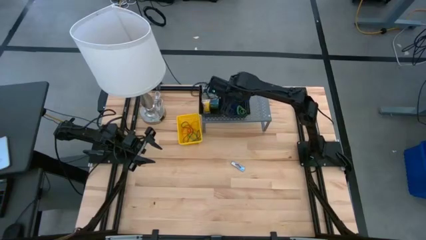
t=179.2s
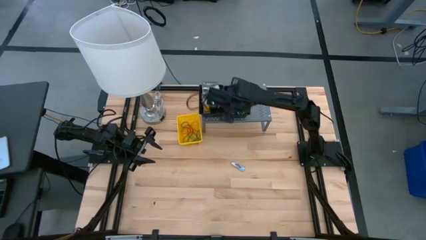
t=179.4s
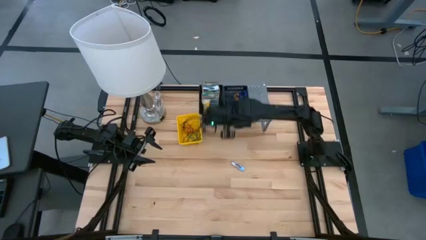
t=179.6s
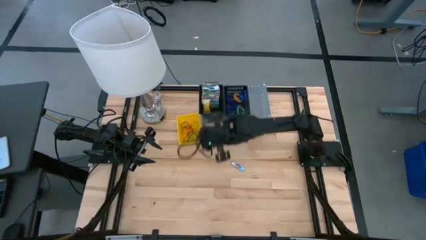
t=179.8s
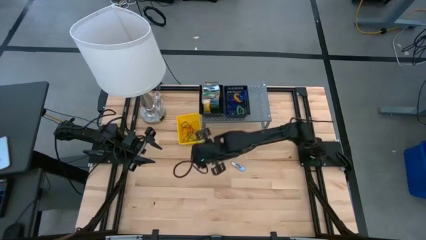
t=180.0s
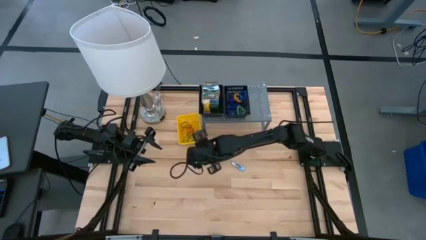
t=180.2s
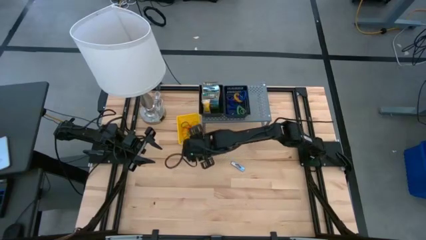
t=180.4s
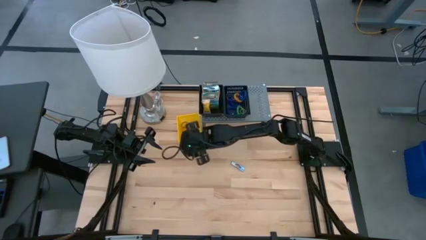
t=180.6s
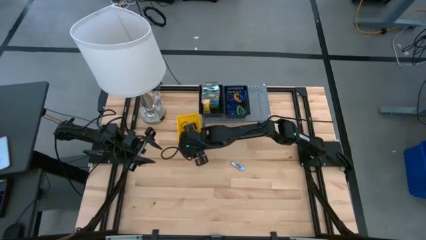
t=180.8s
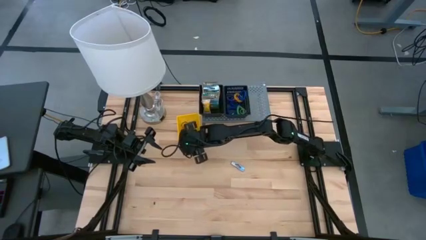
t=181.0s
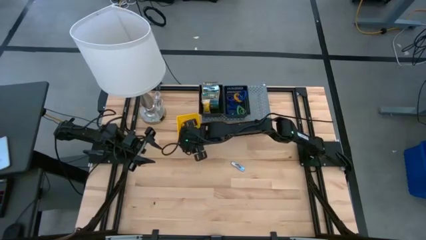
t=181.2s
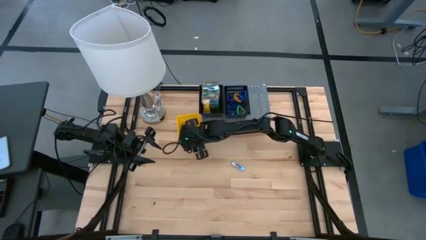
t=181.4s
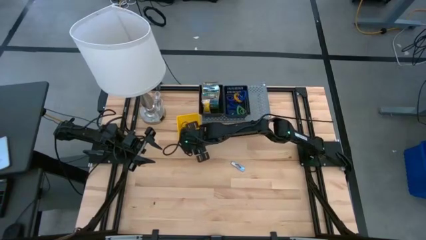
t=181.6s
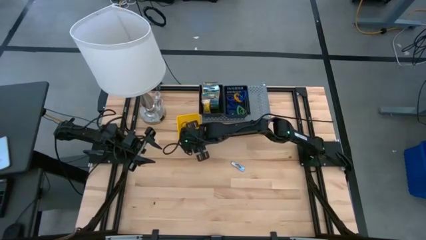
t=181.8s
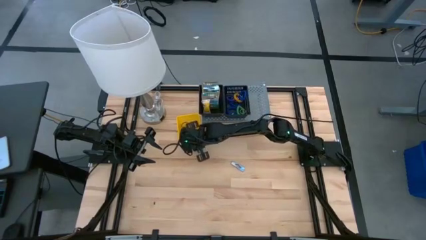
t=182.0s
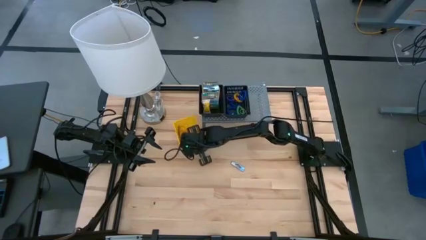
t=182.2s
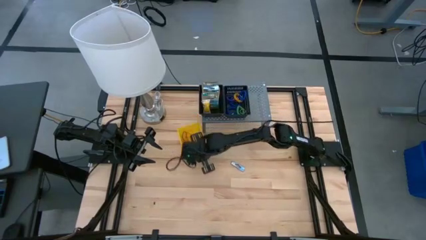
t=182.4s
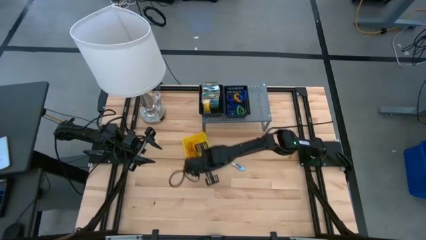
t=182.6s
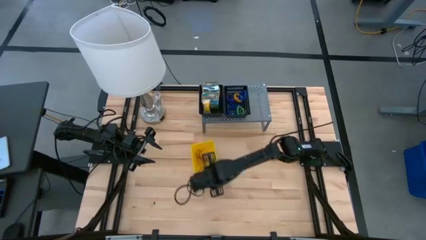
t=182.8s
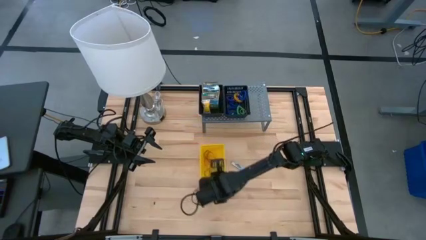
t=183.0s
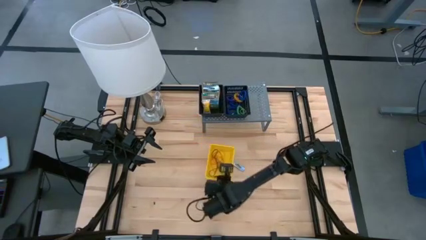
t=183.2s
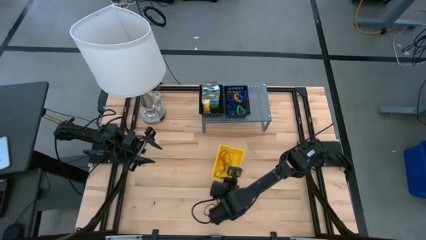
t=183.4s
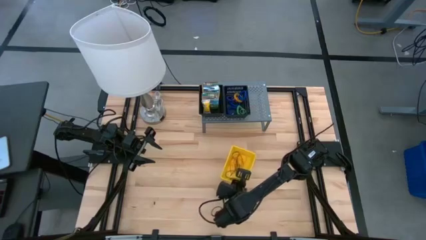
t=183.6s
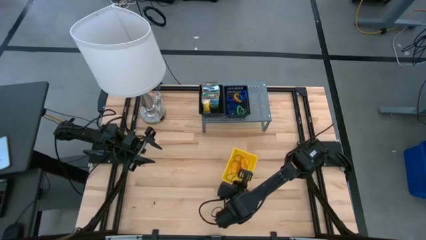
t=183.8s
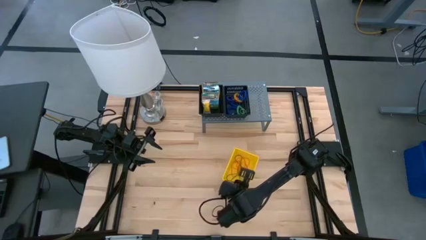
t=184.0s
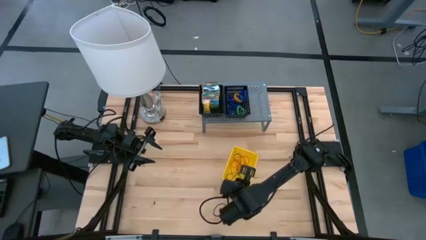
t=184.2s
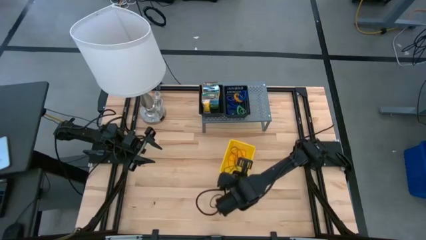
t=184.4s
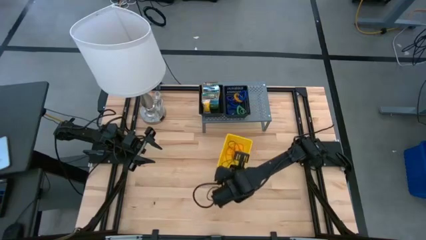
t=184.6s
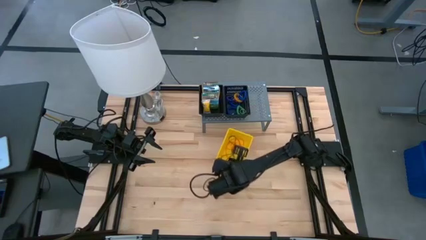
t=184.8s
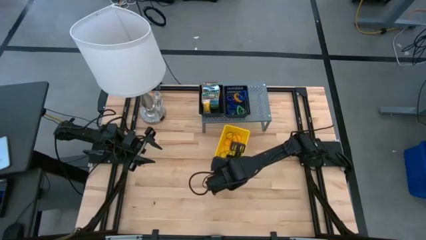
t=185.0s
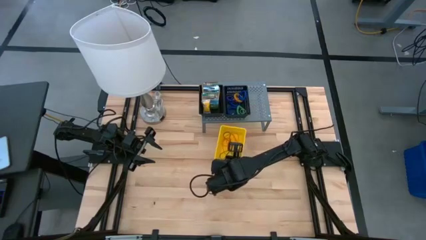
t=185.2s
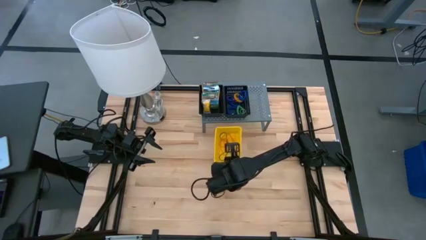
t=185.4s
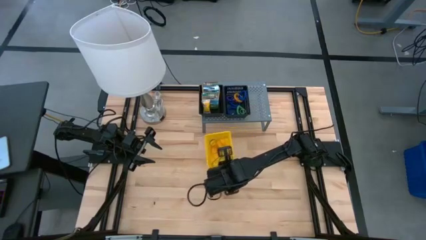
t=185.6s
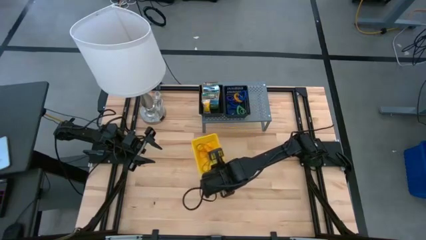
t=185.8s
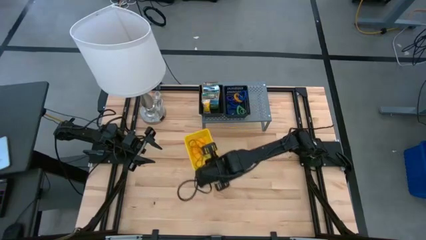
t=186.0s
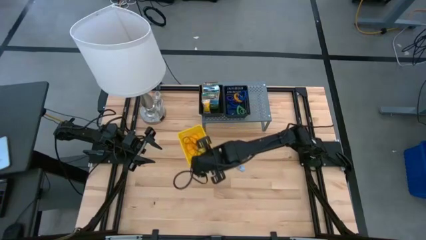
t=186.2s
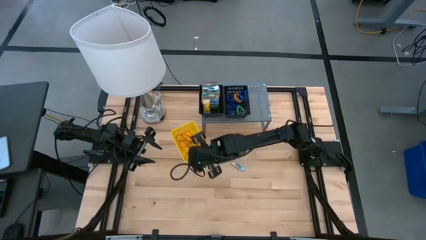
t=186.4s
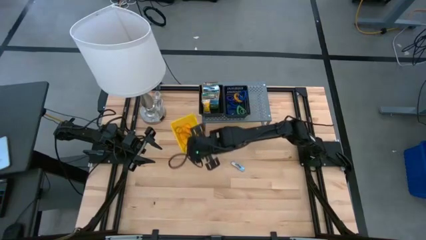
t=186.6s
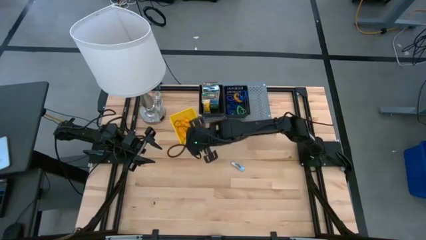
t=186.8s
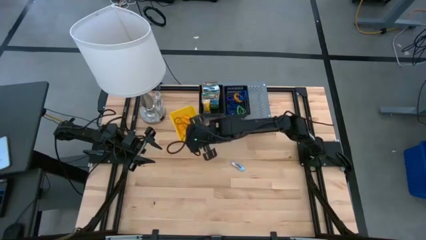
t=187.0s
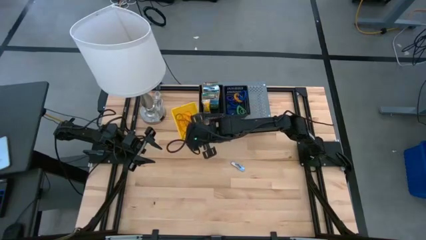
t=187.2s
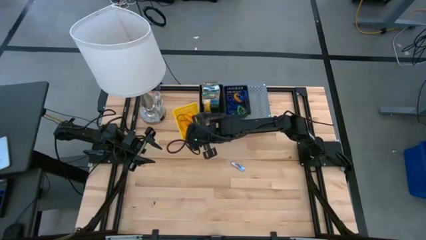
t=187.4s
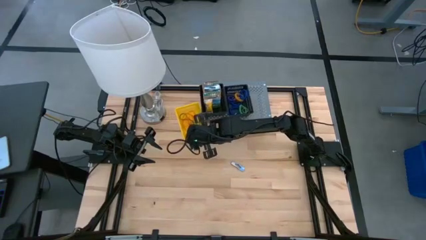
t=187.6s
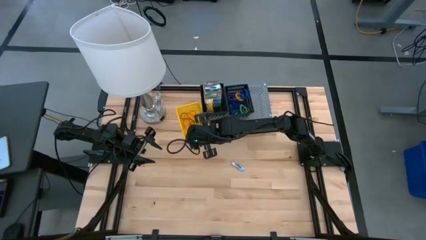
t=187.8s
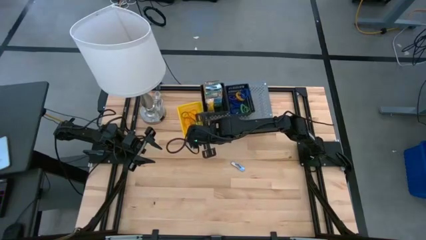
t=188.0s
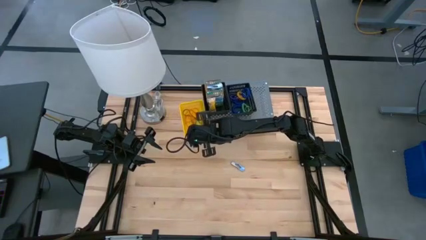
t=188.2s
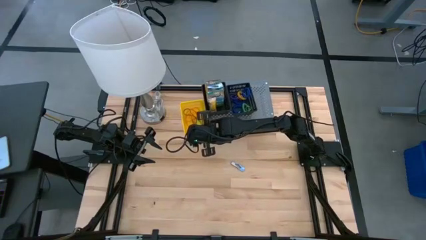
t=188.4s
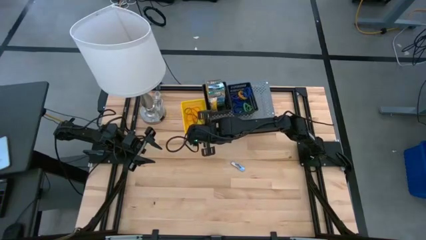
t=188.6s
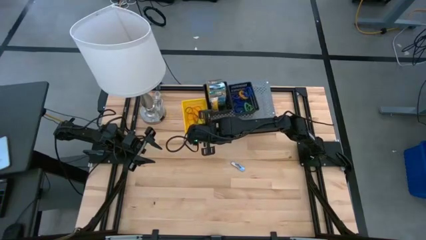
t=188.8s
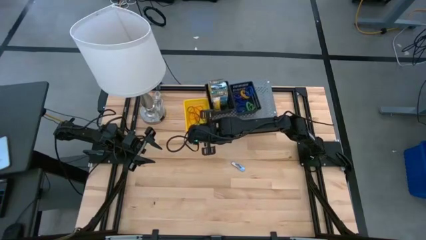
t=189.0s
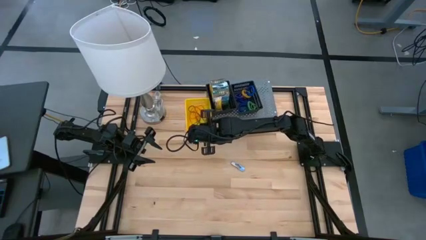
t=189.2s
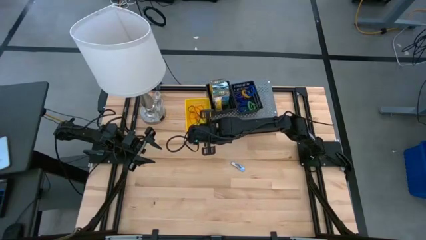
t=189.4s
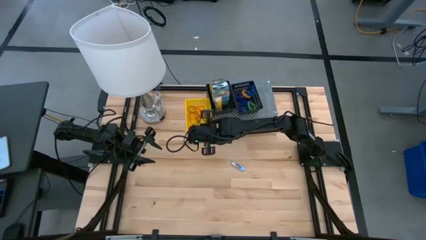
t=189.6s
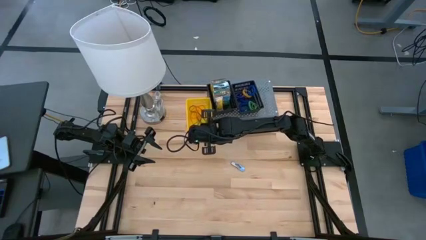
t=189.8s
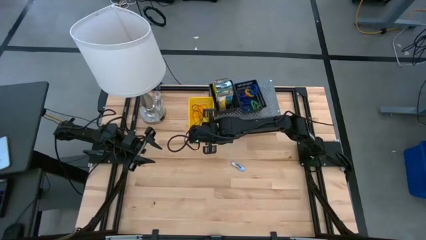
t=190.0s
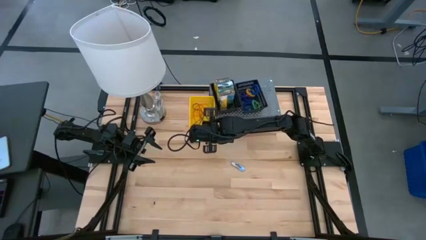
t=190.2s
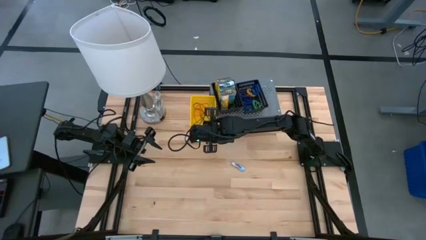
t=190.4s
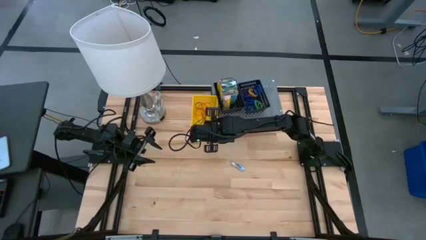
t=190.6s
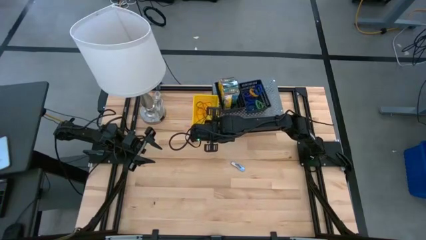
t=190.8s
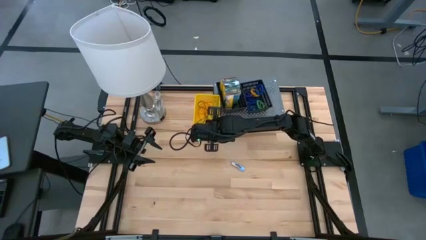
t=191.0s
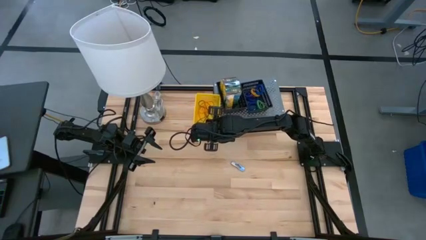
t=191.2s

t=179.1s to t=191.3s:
Task: Pick & Place Office Desk Supplies
Put the yellow bin on the shelf

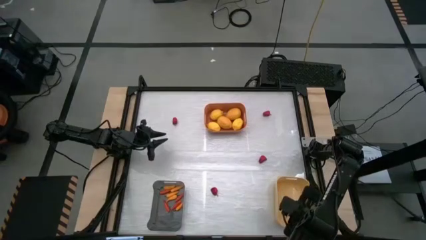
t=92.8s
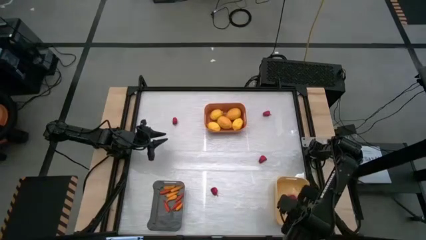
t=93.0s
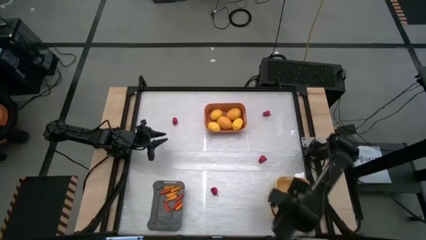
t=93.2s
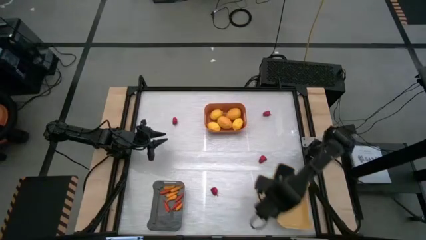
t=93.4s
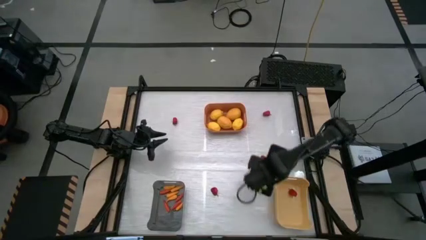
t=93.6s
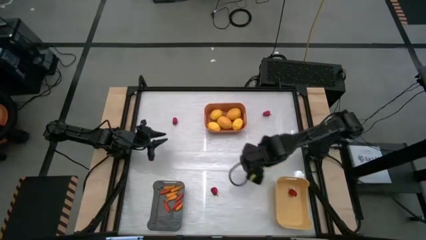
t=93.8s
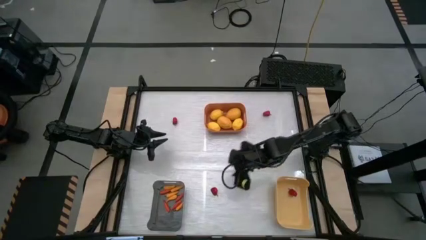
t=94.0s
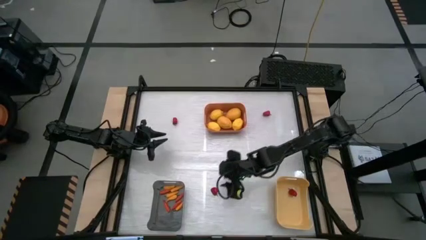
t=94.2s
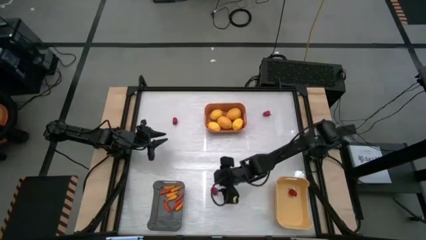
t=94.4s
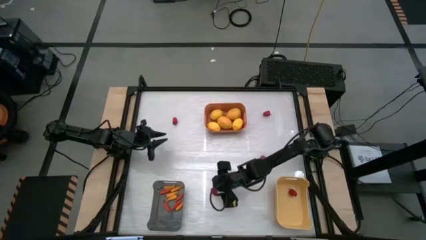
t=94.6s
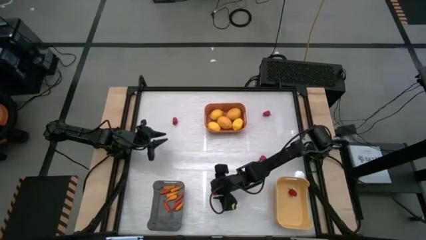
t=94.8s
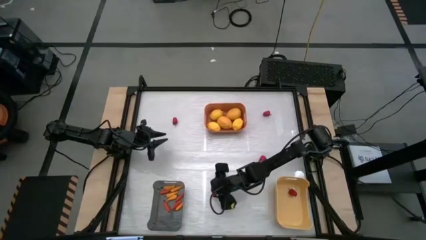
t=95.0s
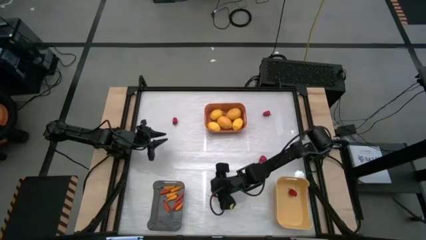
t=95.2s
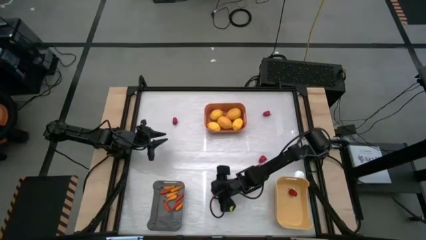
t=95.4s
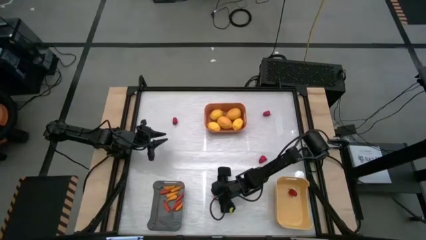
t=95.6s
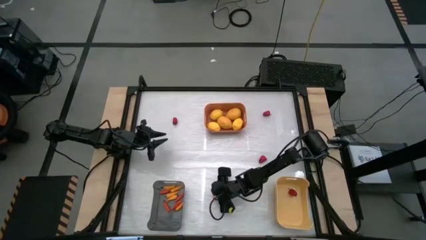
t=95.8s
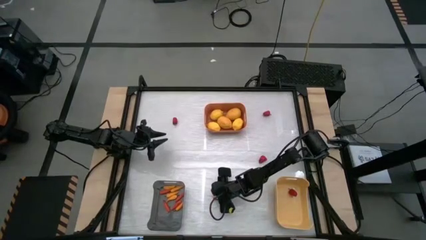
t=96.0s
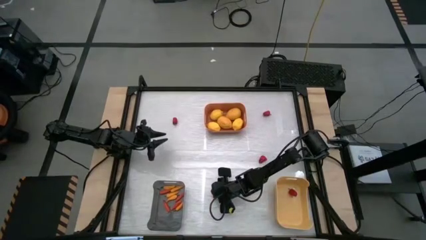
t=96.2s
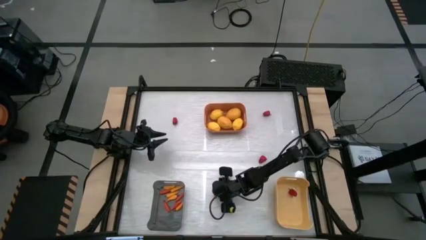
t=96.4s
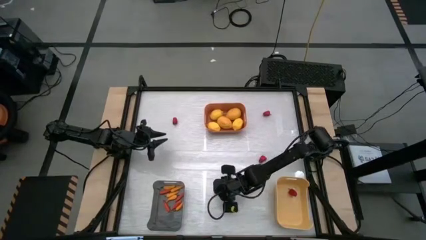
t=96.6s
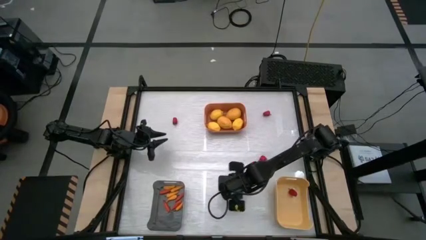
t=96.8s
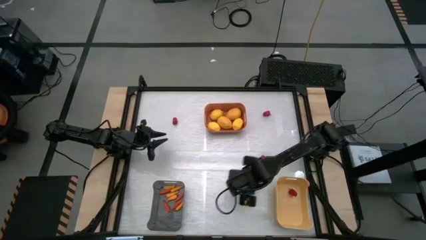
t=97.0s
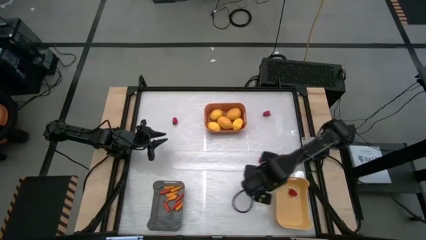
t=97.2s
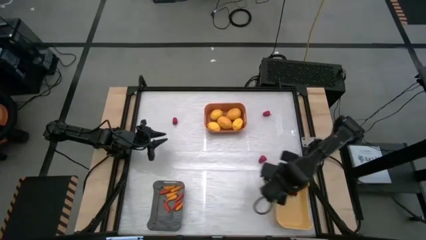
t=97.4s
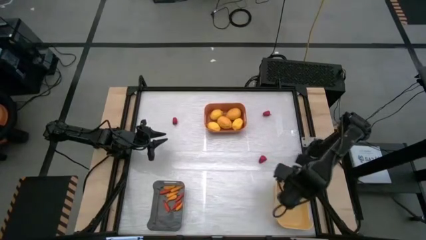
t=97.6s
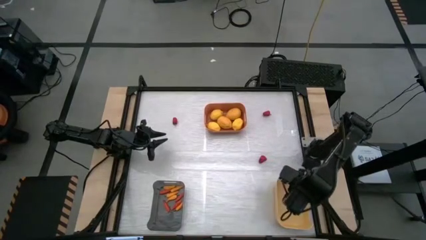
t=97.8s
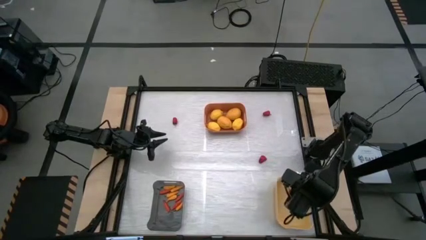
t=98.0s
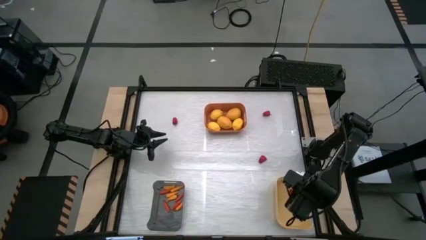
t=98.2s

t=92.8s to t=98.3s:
Task: Sort produce into baskets
Put the red chili pepper into the yellow bin
